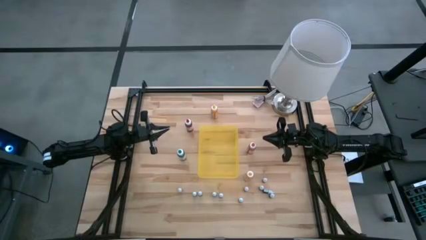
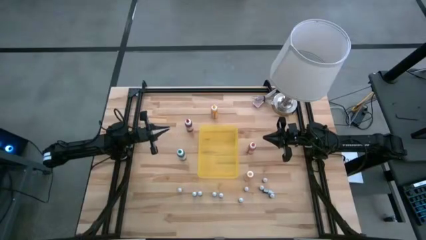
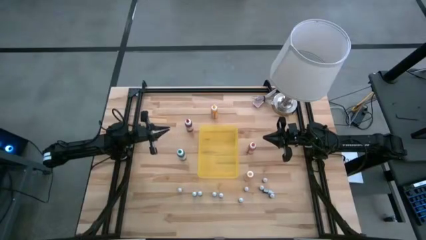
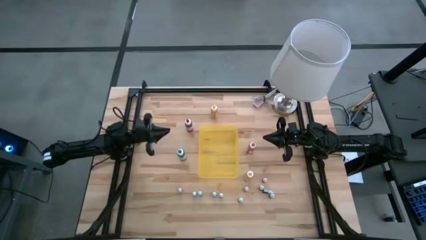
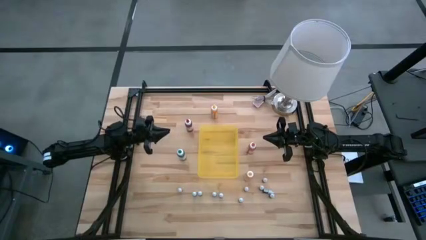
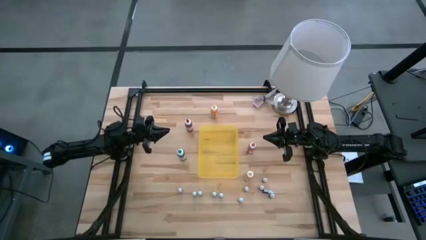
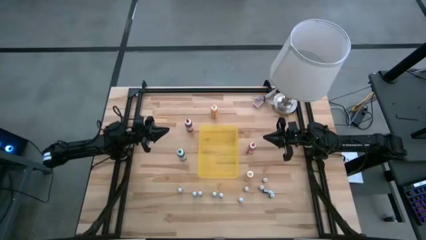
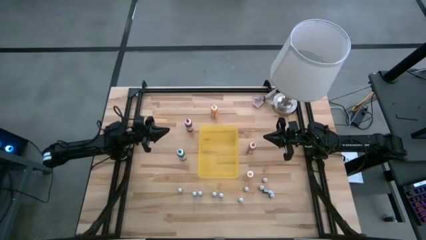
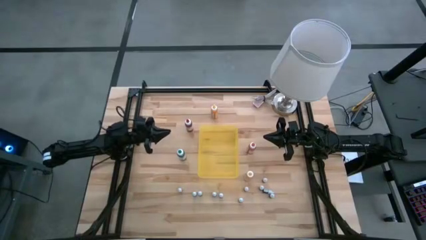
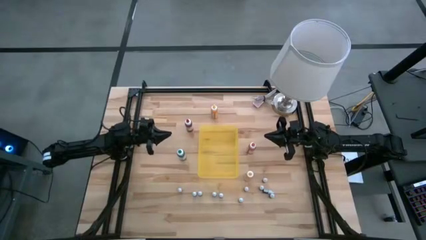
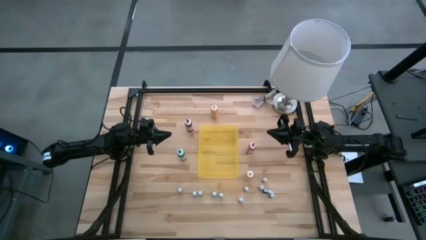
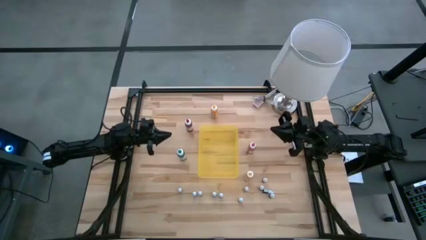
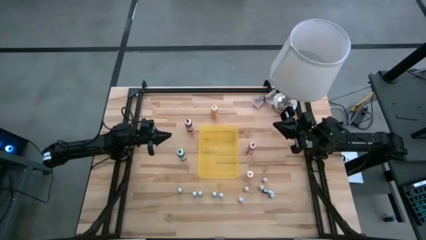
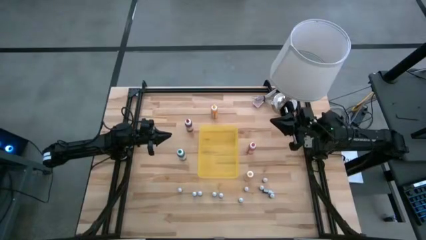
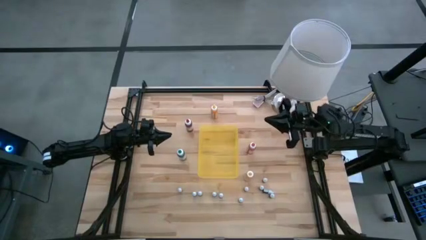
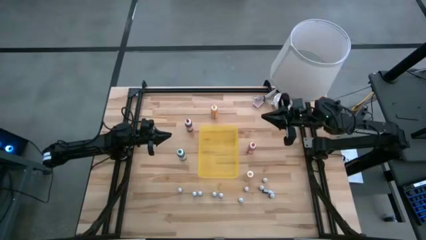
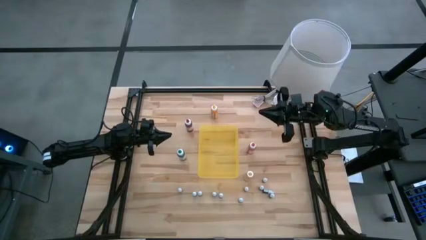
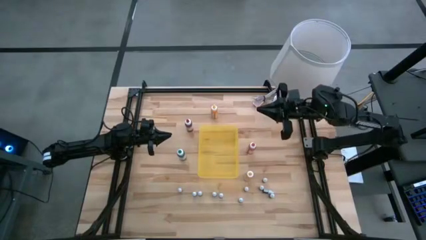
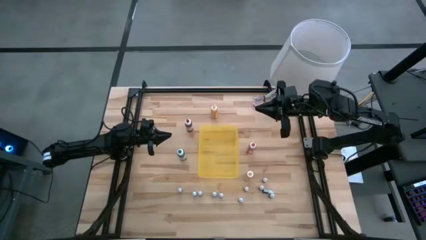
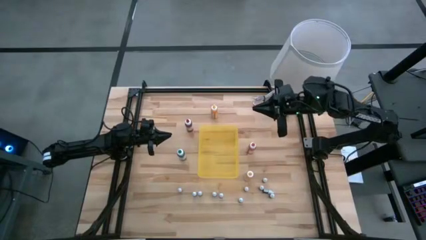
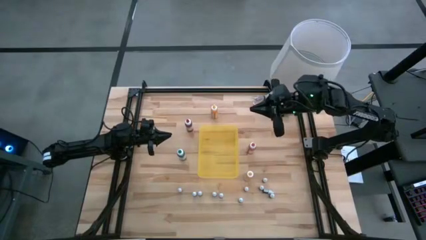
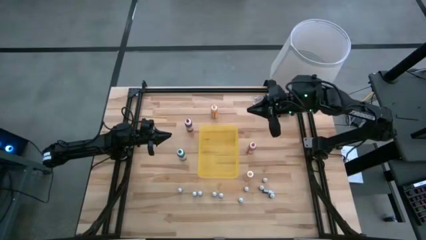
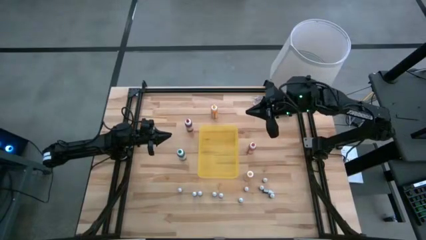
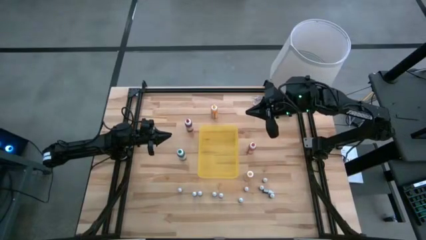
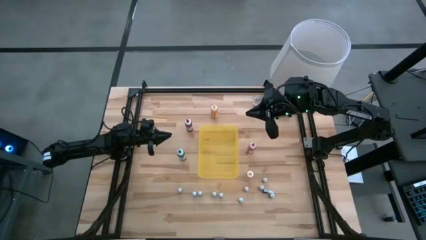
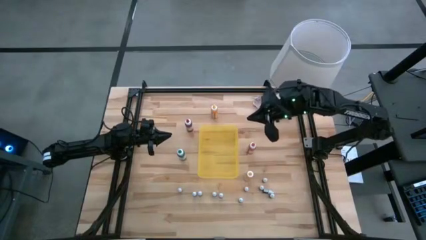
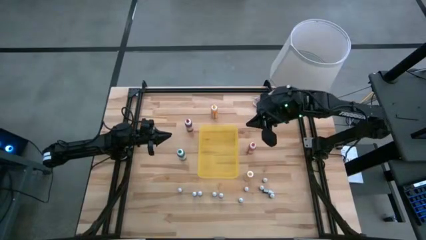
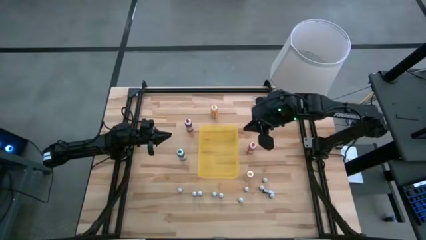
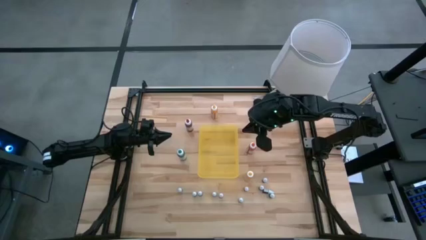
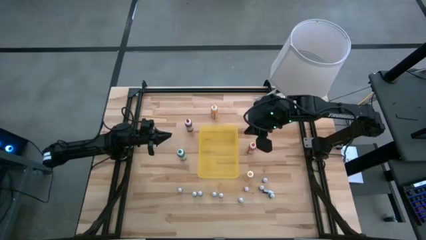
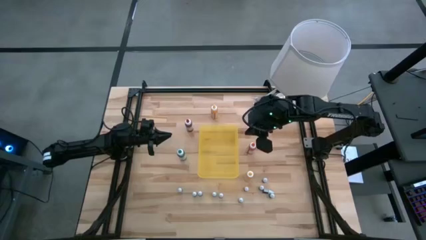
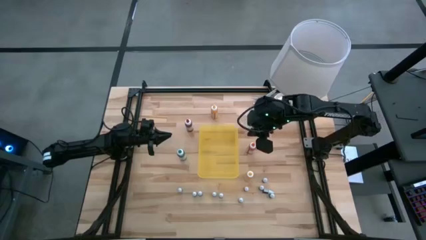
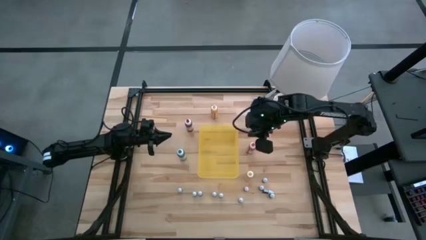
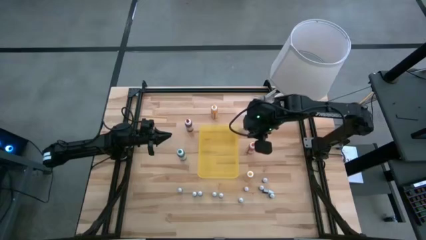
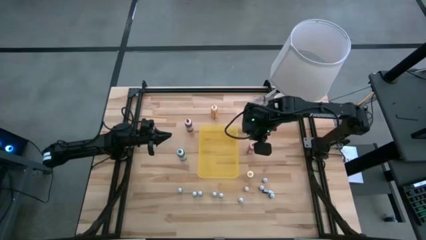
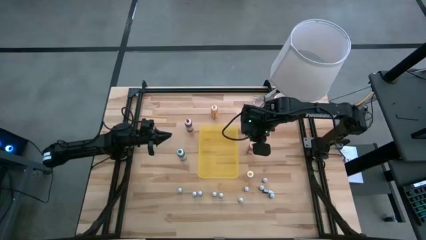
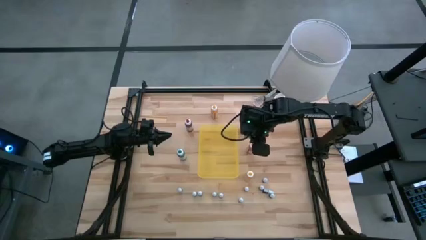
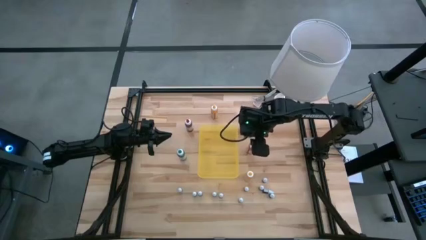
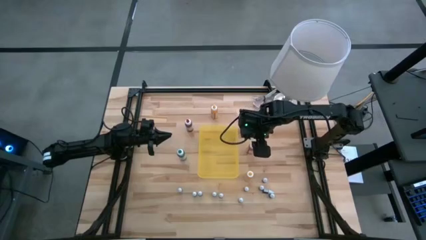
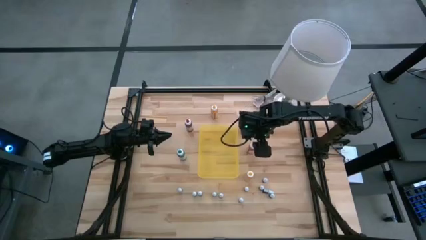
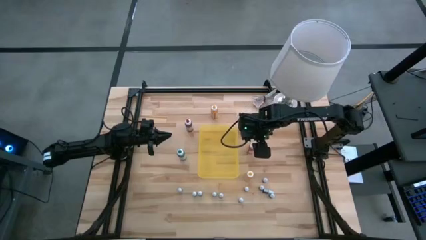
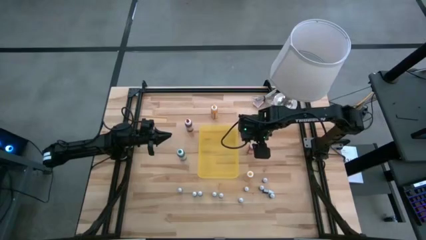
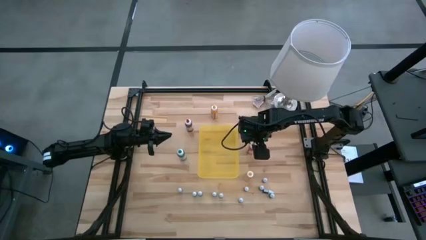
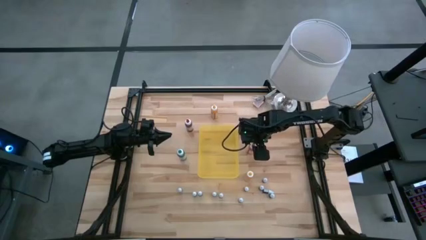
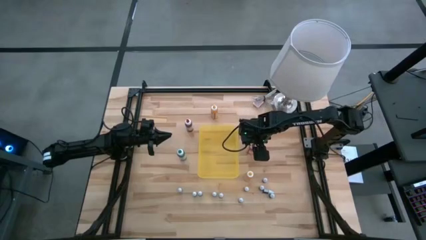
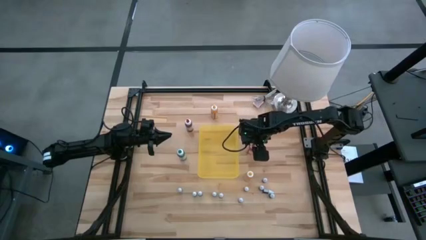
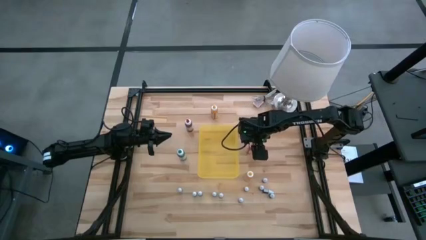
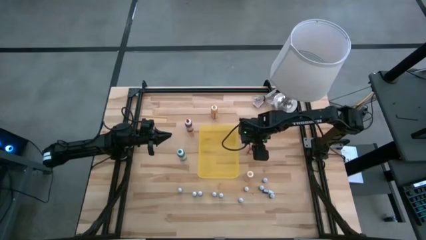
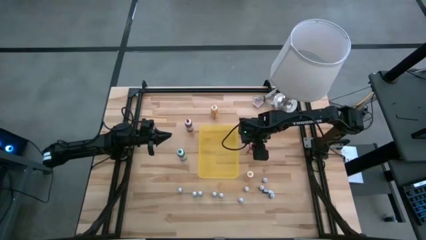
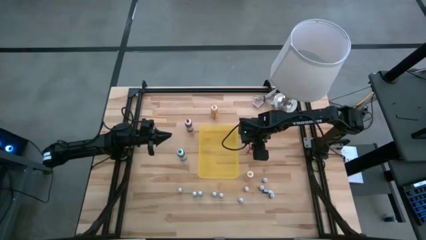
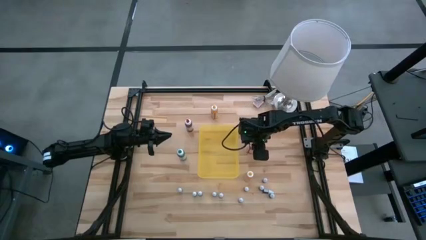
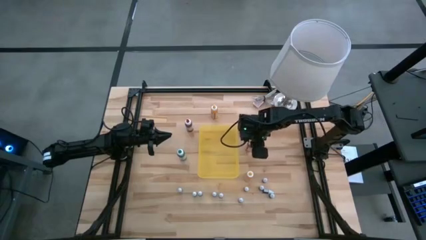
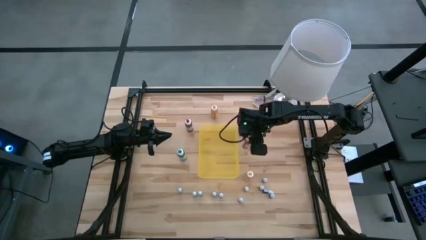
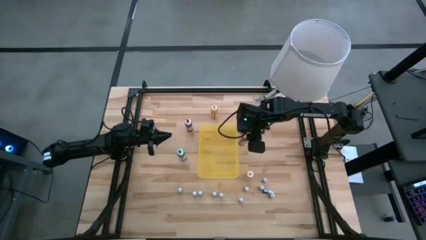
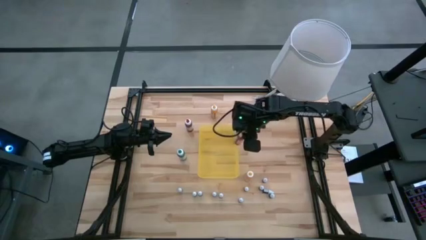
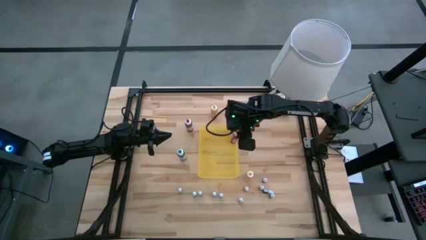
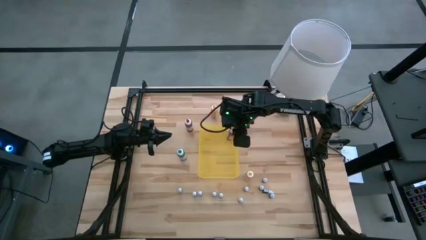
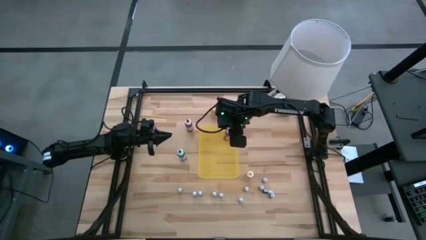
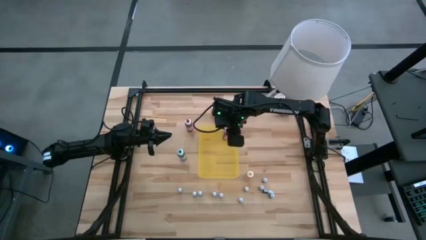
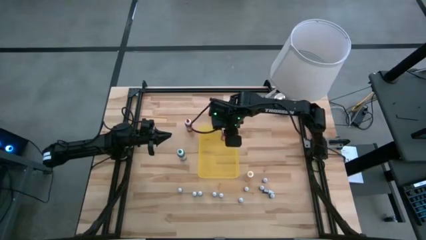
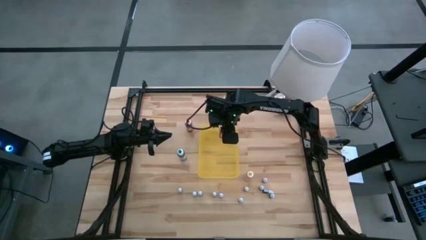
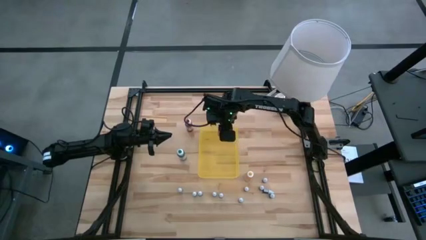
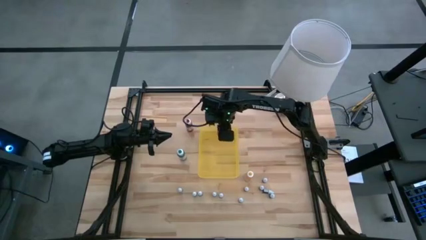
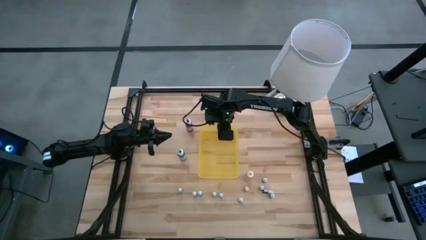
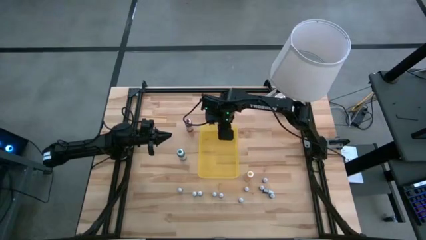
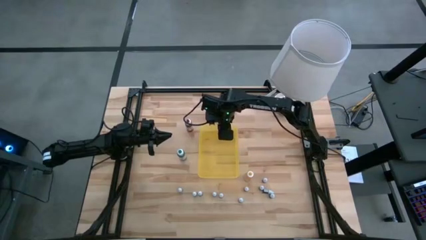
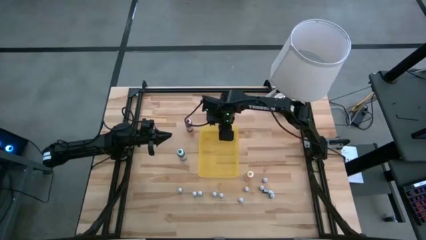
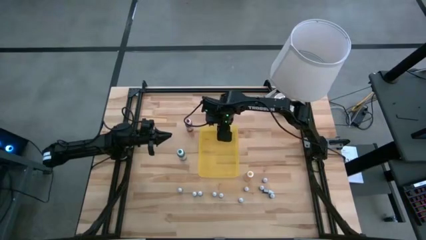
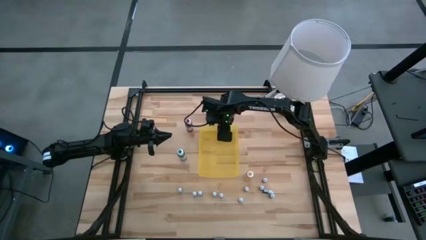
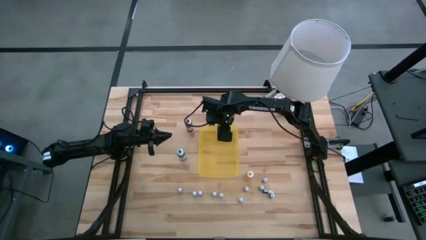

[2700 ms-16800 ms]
Task: Pick & Place food coloring
Put the large orange food coloring bottle into the bin

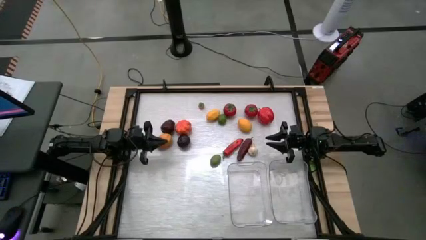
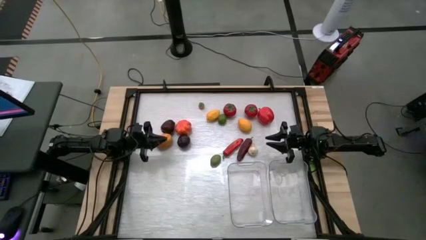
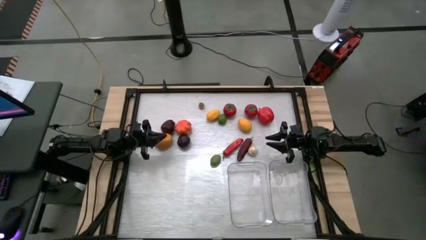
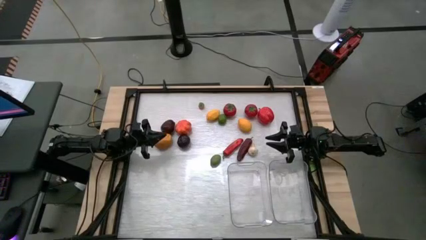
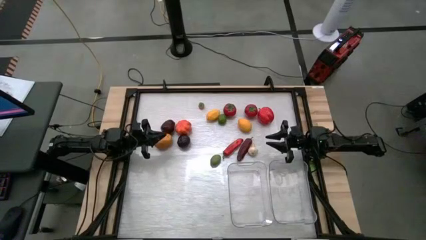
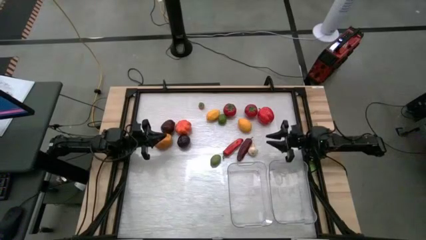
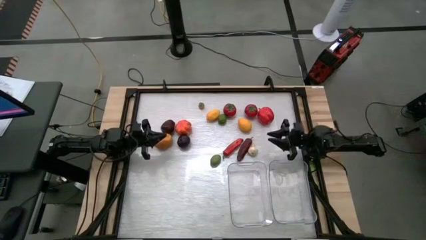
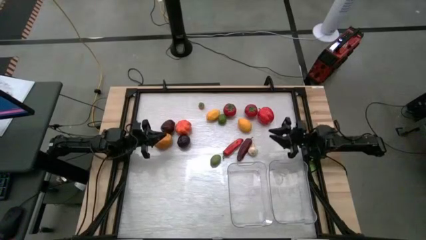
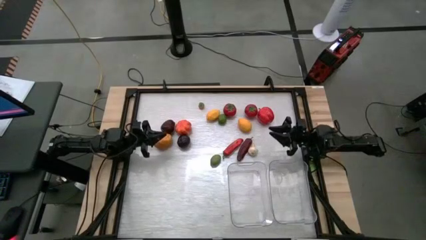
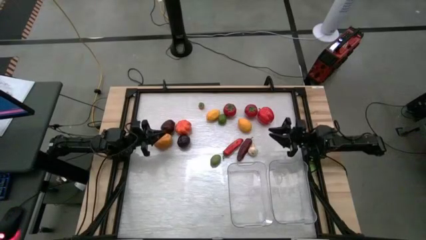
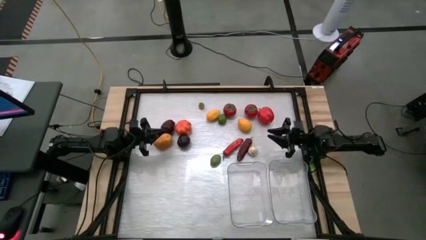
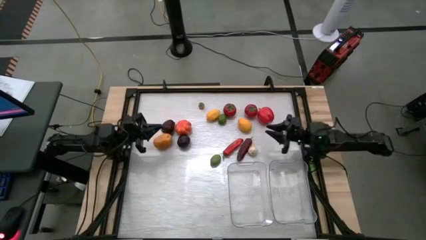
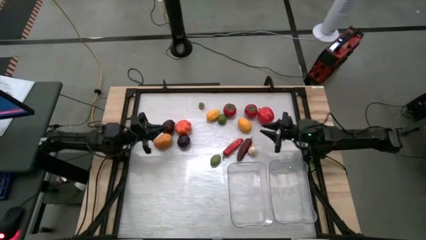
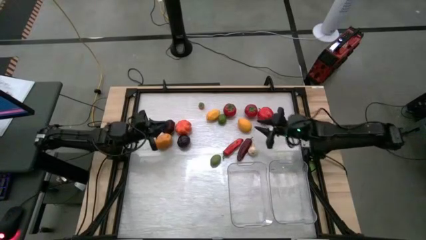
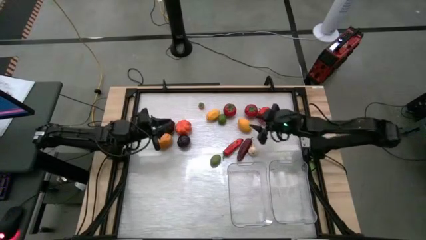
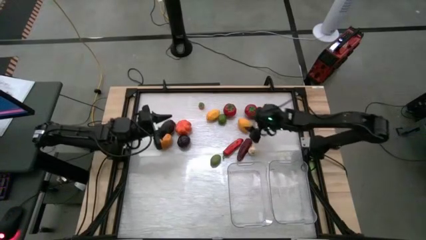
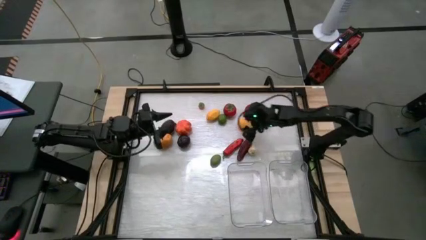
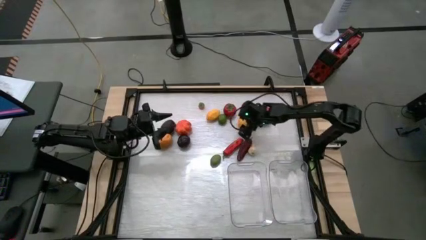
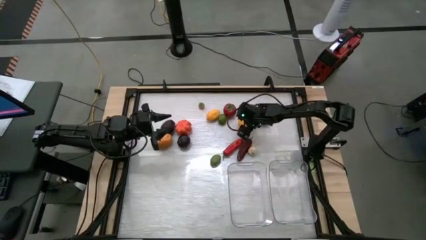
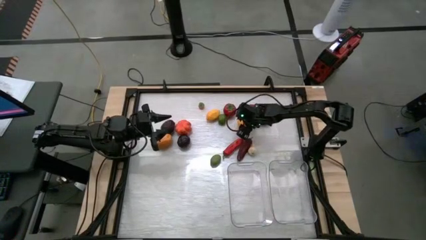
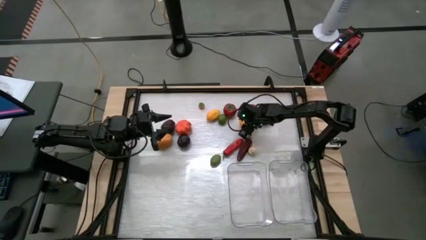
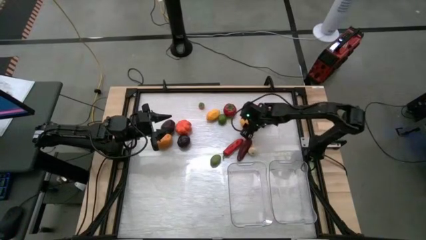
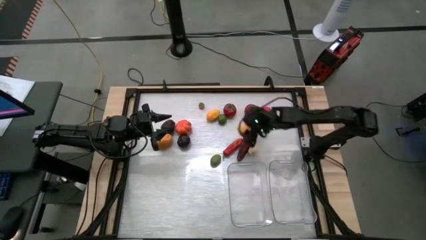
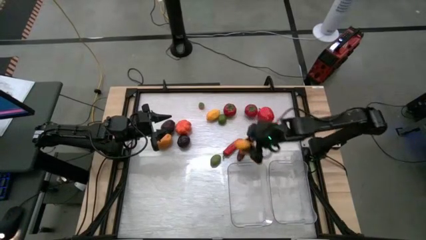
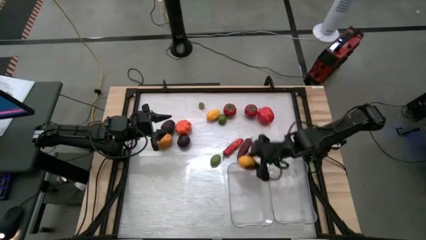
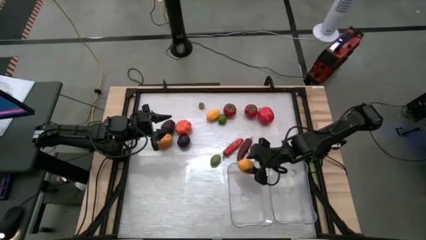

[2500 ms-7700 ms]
Task: Sort produce into baskets
Put the right lemon into the left transparent bin
